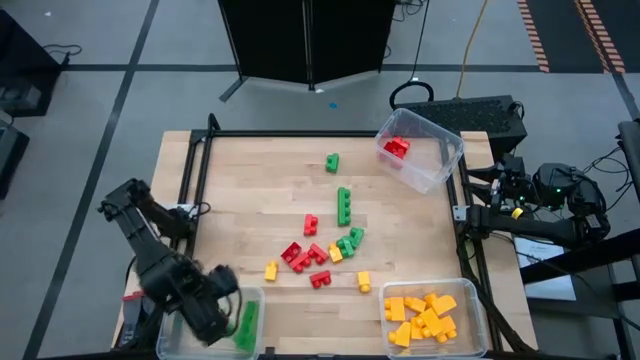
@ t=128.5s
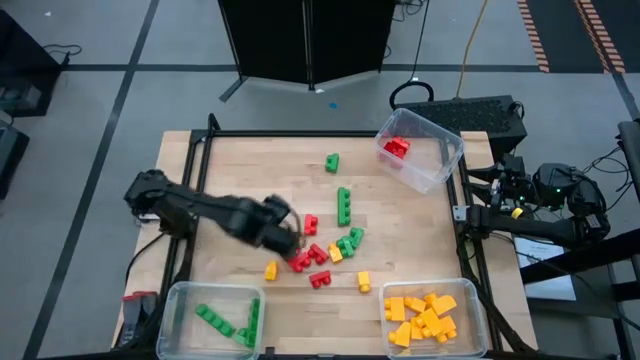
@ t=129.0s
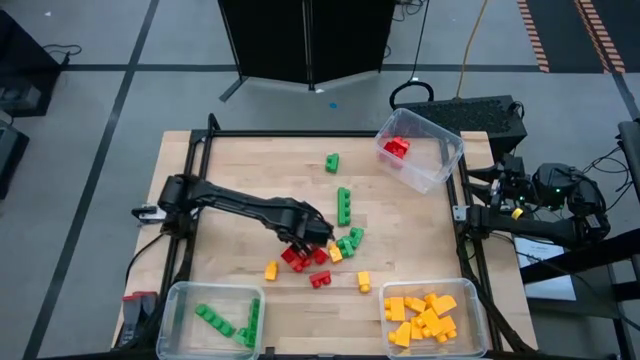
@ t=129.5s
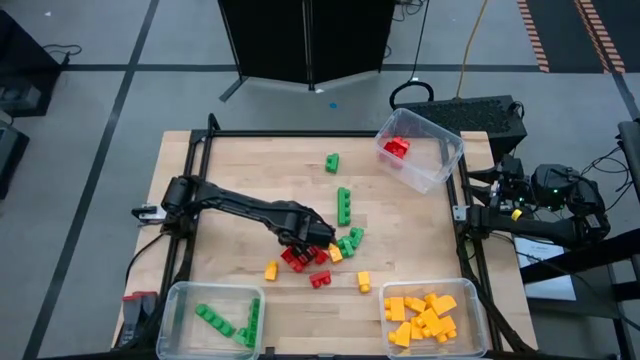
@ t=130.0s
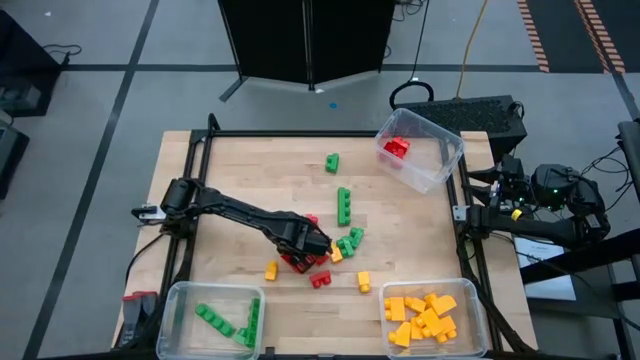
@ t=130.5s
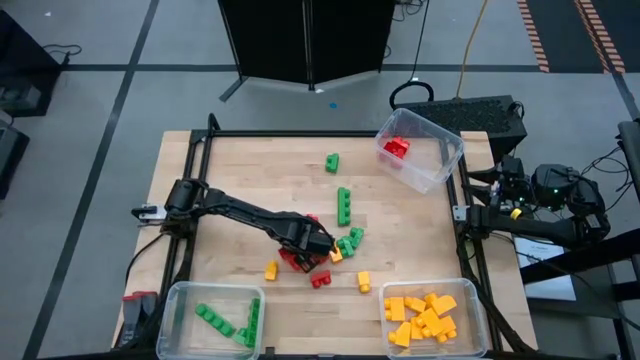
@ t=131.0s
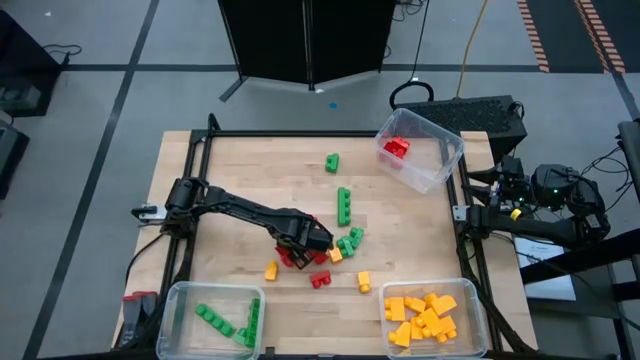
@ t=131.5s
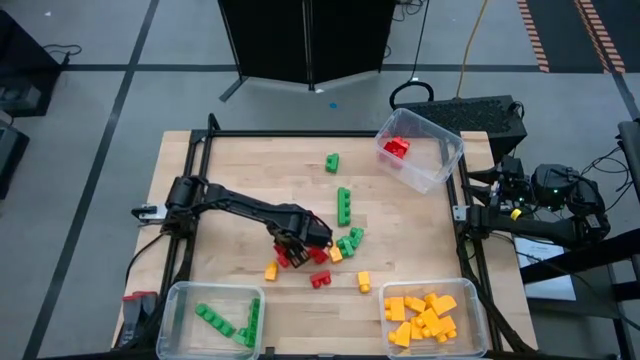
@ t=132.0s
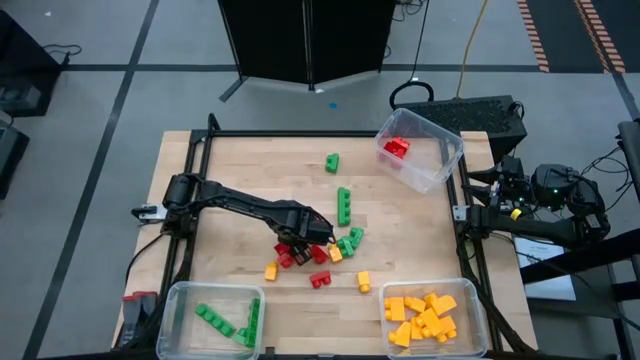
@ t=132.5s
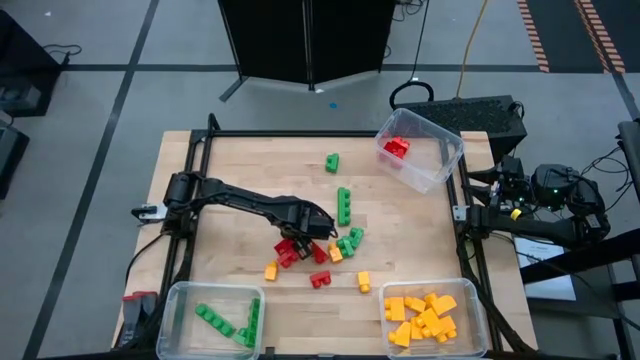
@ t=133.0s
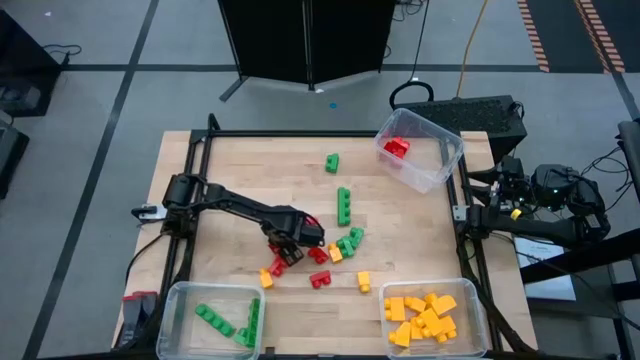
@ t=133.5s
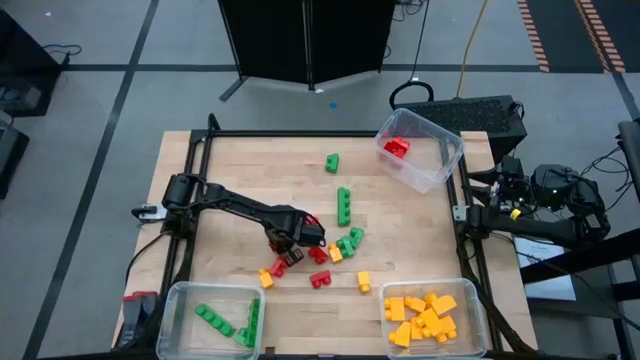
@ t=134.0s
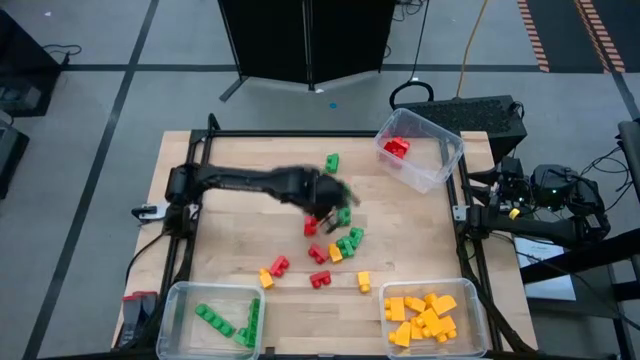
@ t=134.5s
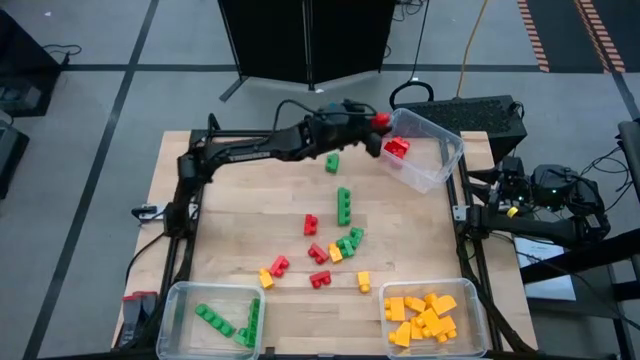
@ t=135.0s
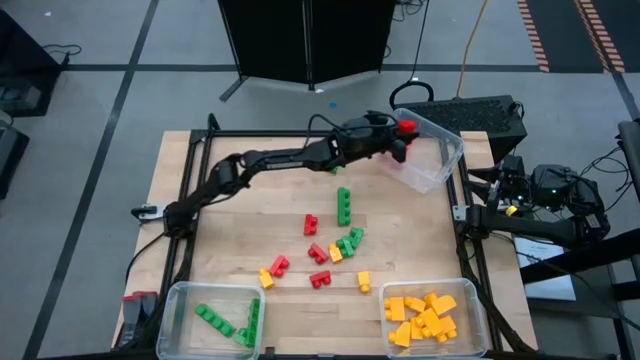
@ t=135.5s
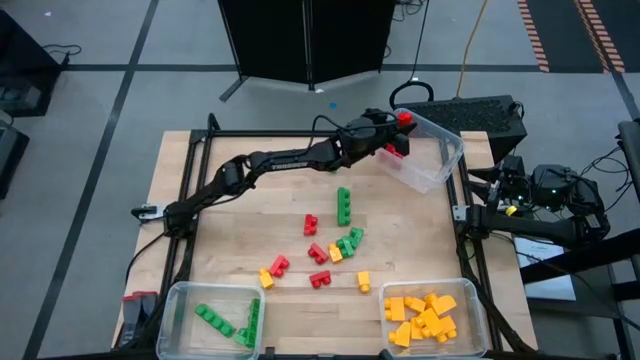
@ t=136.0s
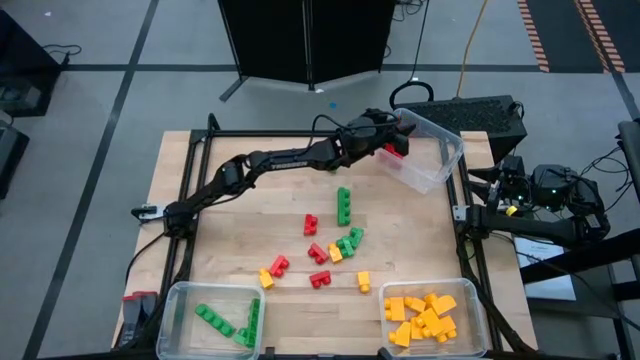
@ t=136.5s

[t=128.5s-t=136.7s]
Task: Sort blocks
Put the red game piece into the top transparent bin

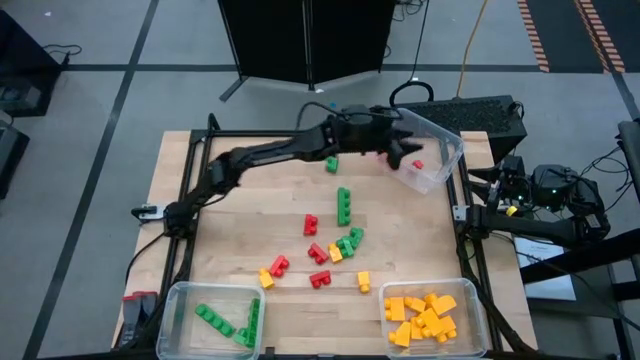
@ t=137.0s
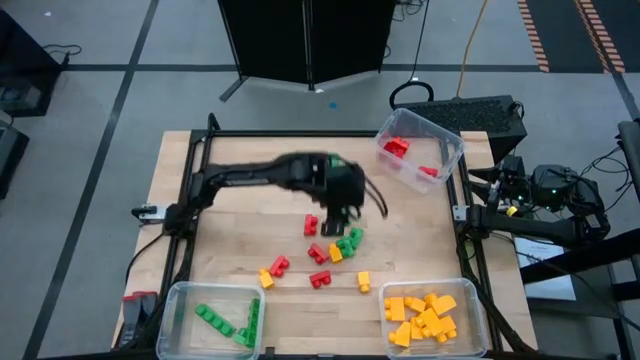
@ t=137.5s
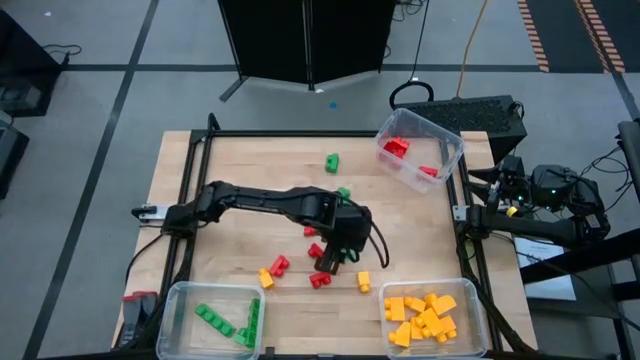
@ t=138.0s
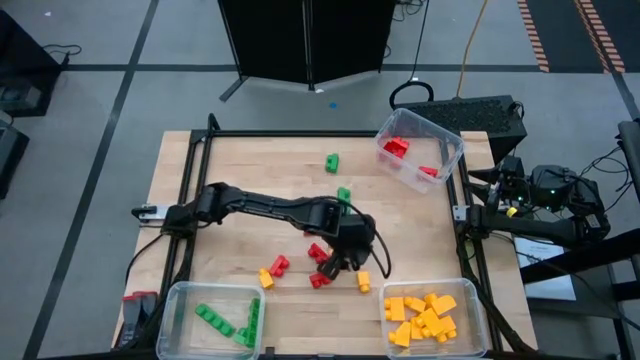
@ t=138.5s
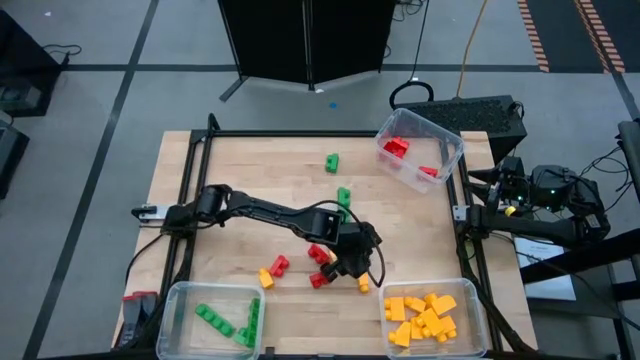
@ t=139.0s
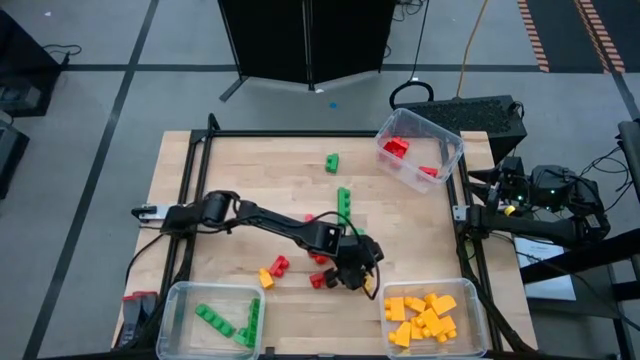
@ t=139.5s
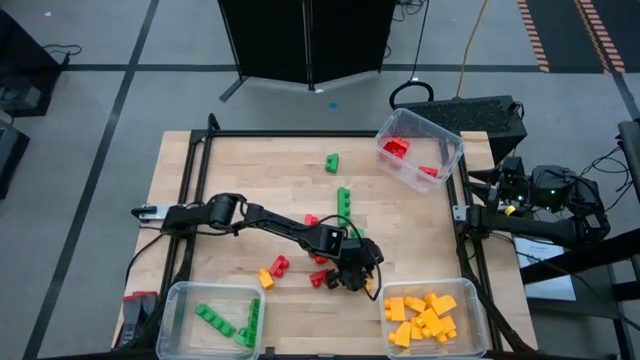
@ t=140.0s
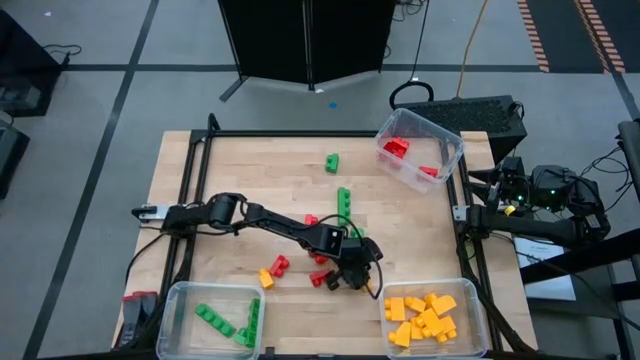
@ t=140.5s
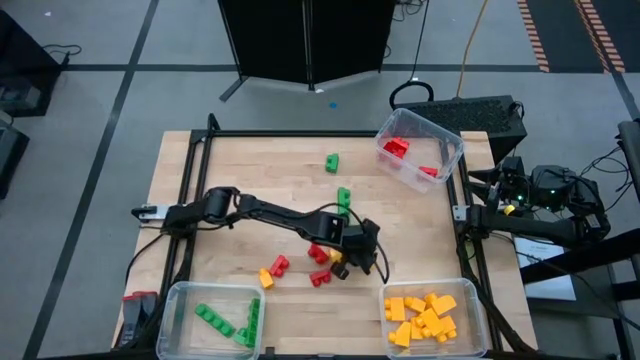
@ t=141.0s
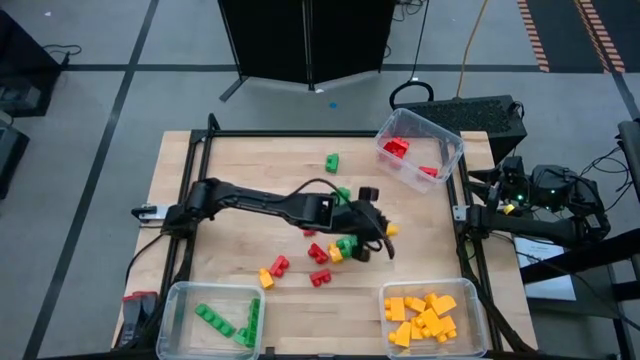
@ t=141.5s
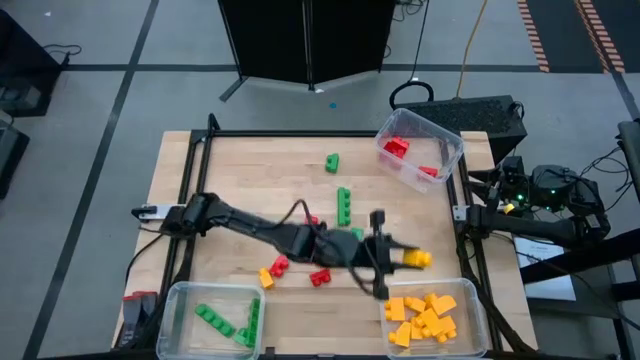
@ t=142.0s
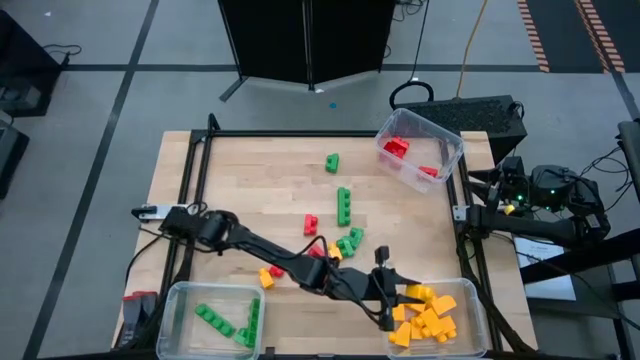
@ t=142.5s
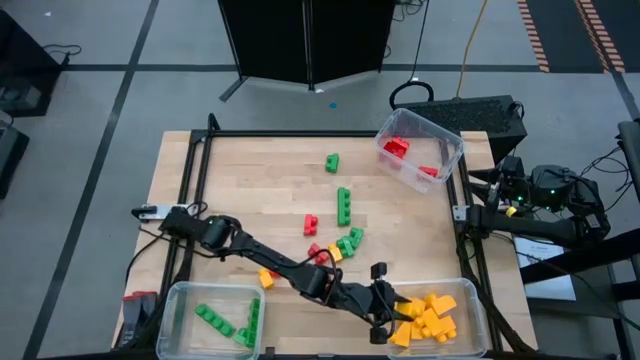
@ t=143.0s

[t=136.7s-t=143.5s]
Put the yellow game piece into the bottom right transparent bin

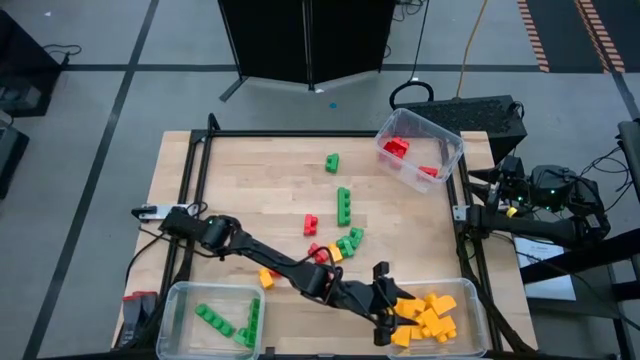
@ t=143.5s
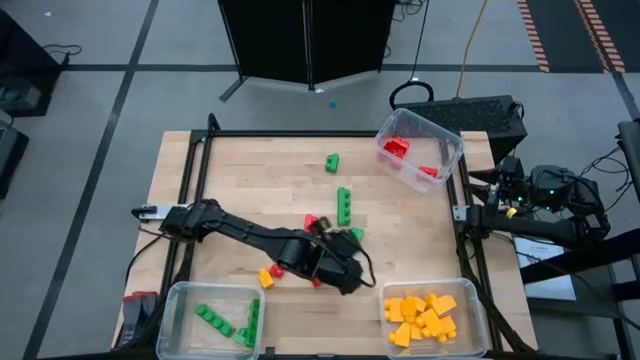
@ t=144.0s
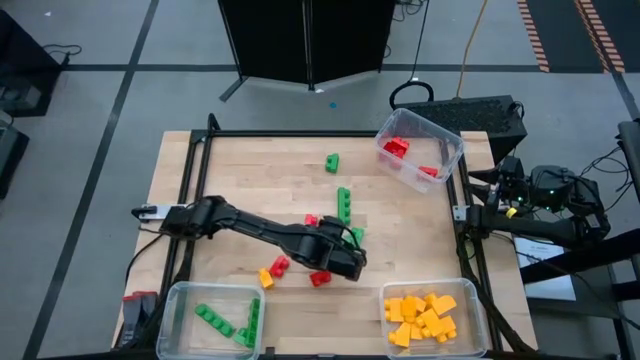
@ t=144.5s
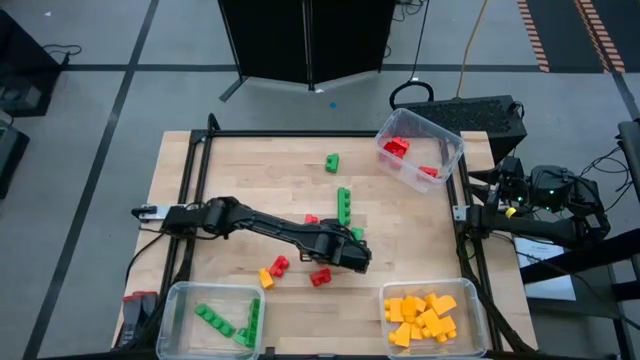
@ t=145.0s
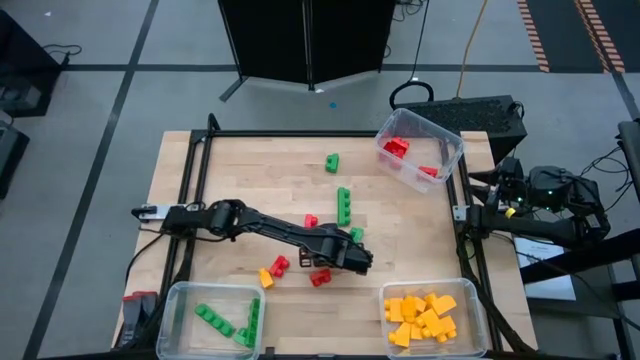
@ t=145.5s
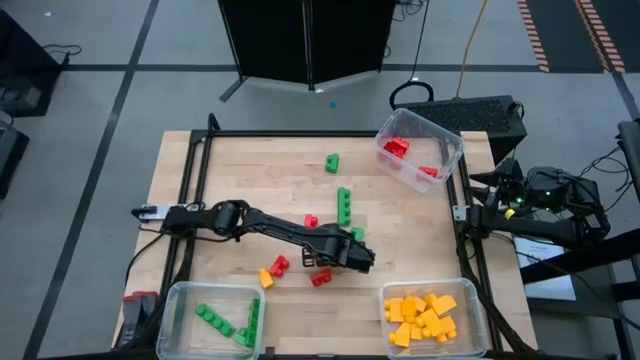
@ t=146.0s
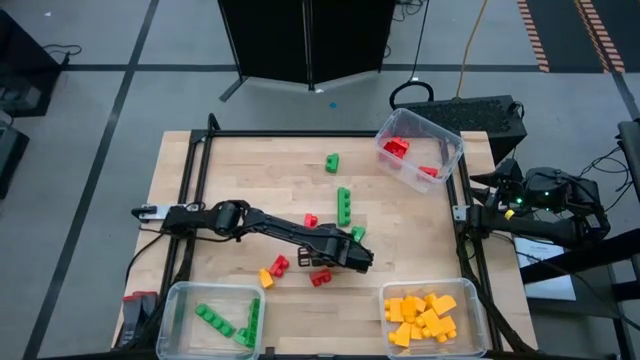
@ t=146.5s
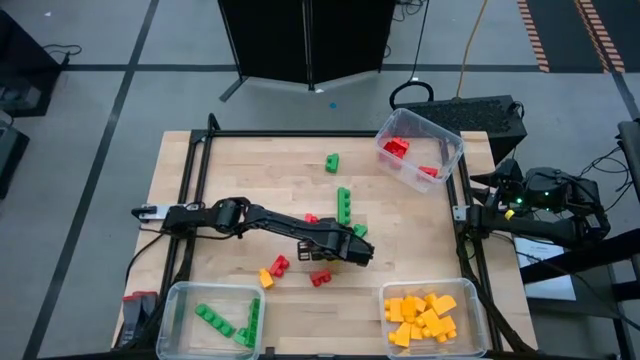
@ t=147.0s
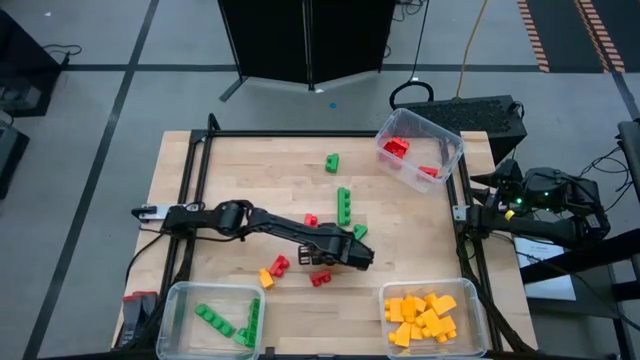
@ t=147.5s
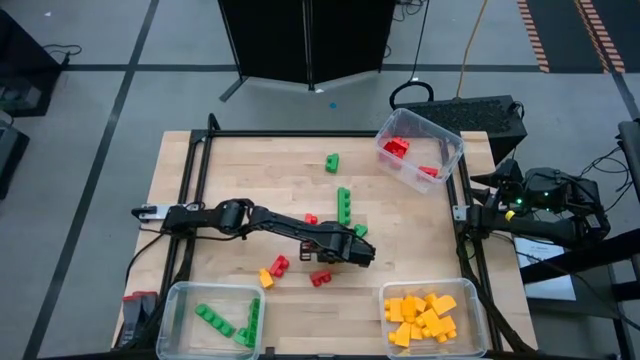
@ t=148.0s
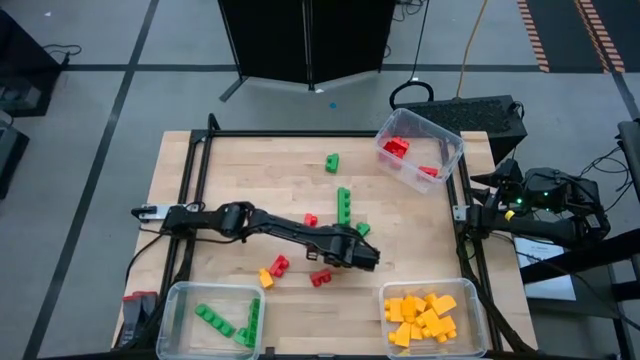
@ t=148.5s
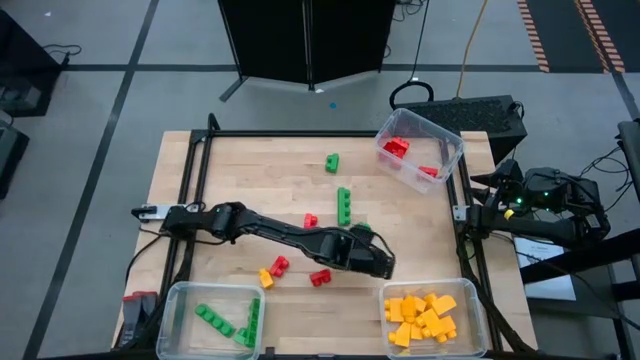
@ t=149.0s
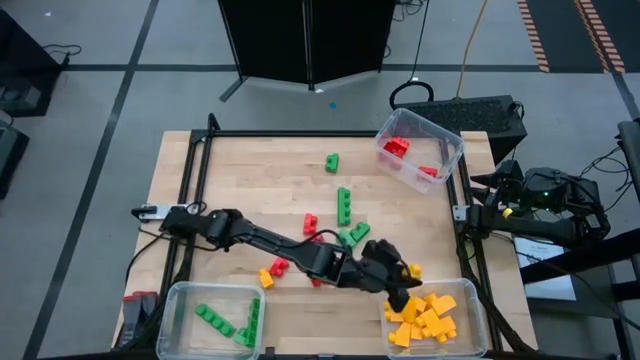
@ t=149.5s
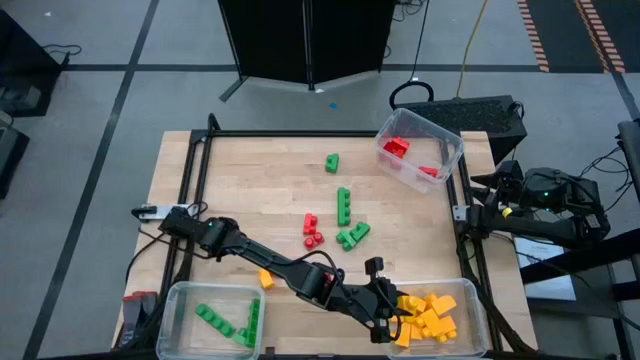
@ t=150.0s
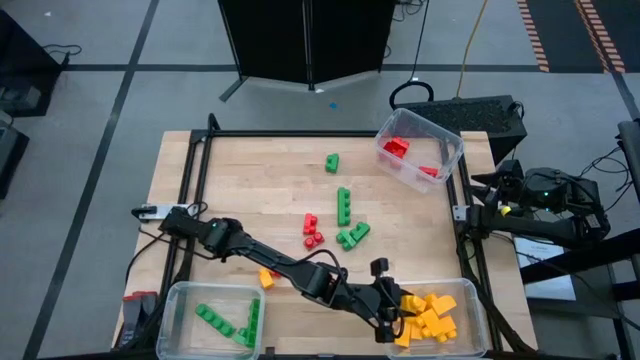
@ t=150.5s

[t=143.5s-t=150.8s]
Put the yellow game piece into the bottom right transparent bin

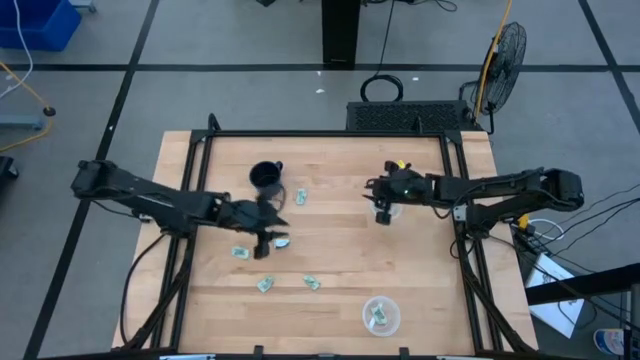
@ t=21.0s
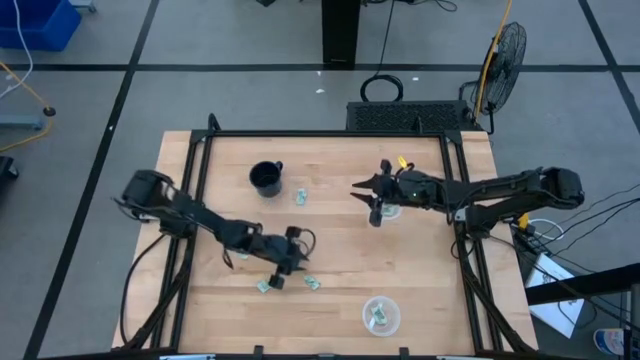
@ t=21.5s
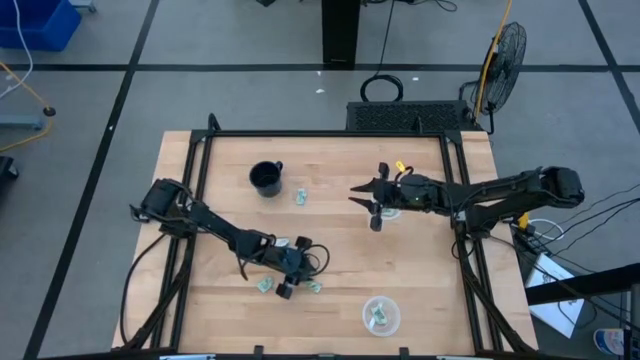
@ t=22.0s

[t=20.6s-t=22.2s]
Task: Pick and place Stevia / Truvia into bins
Put the light green stevia packet into the bottom transparent container
